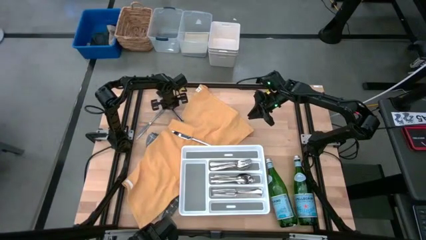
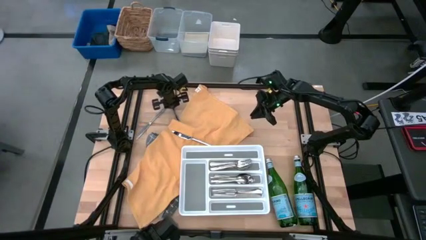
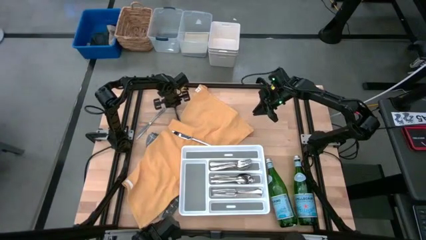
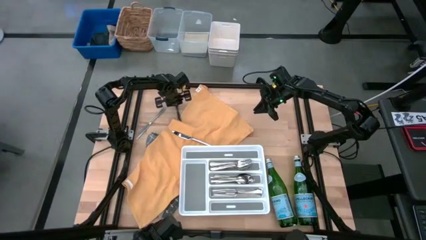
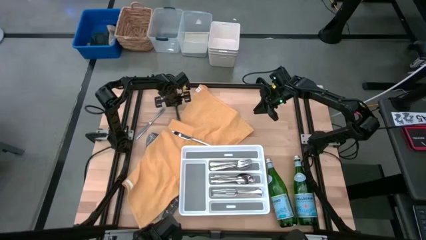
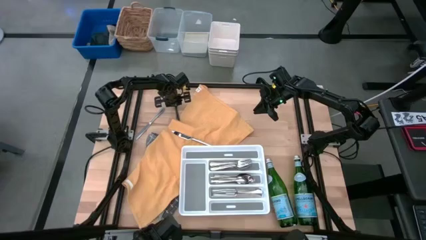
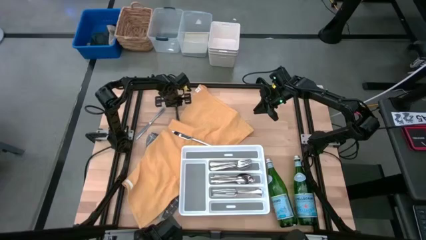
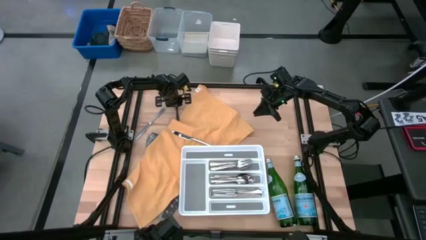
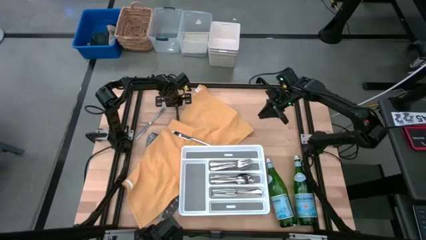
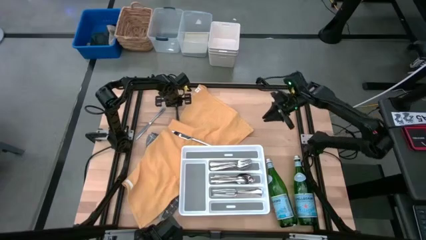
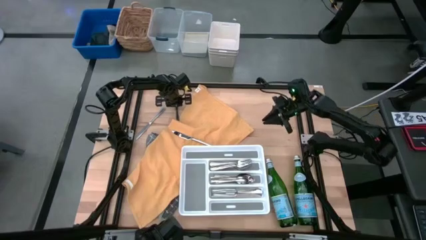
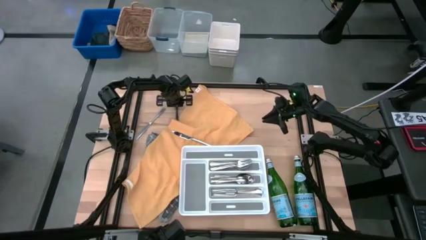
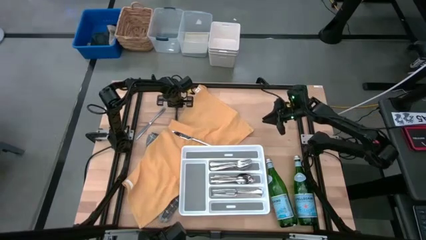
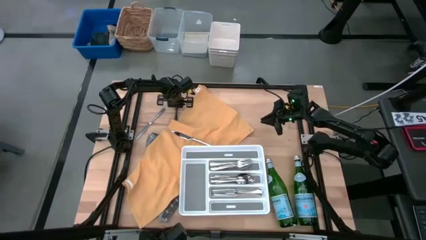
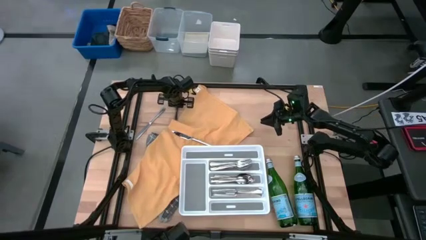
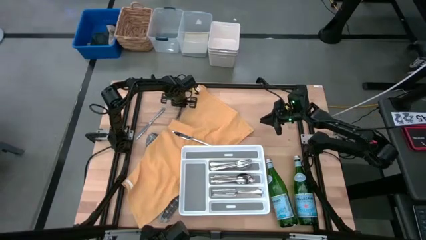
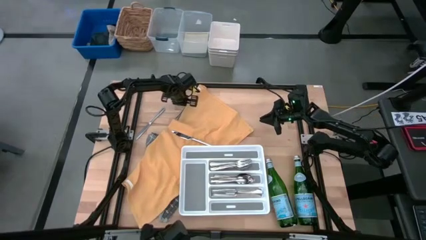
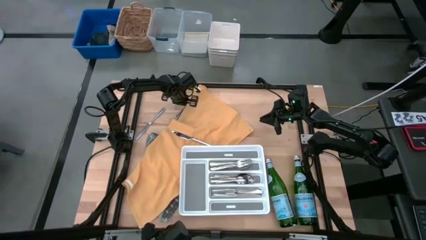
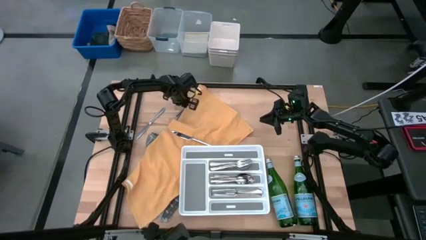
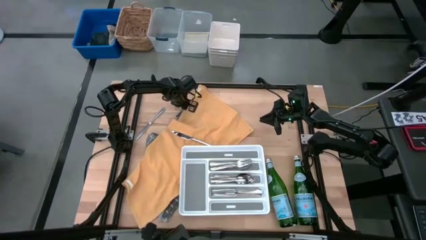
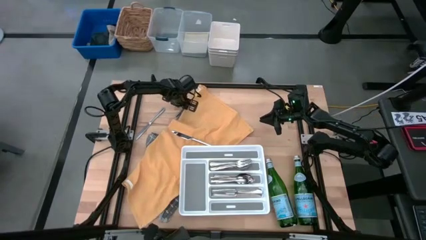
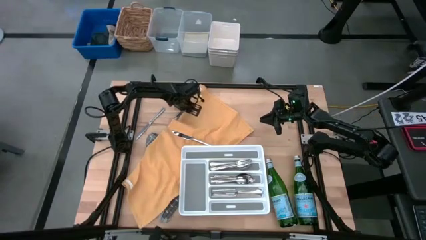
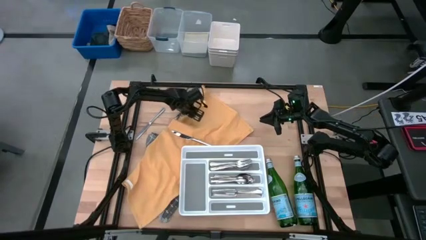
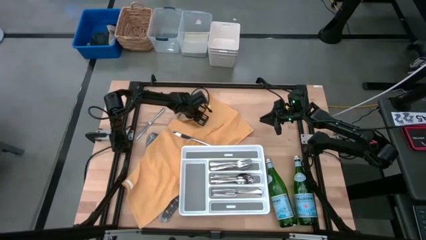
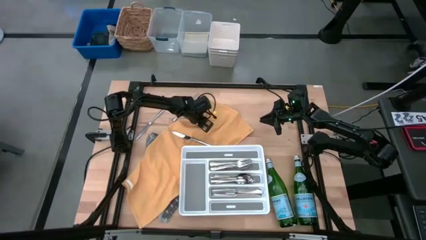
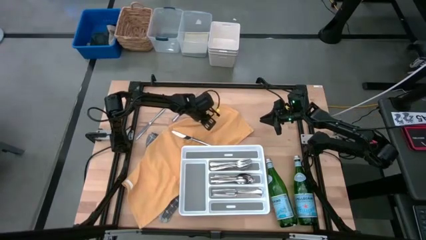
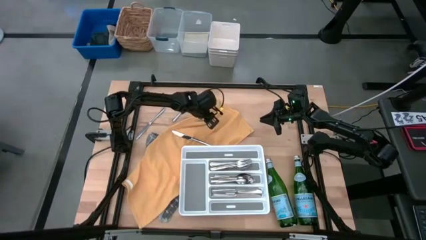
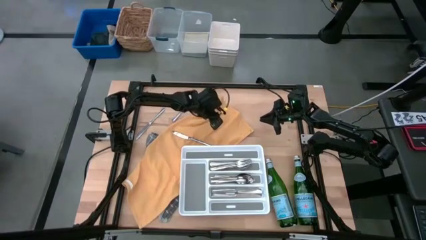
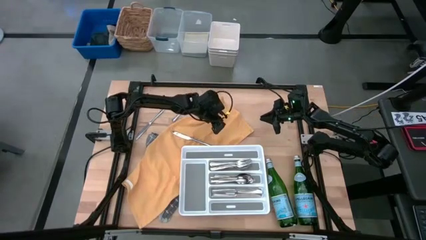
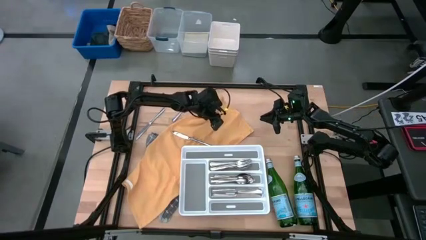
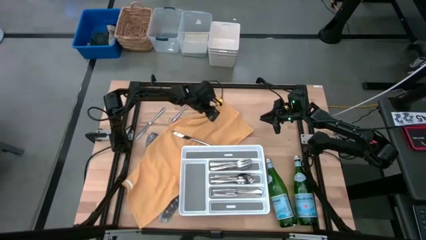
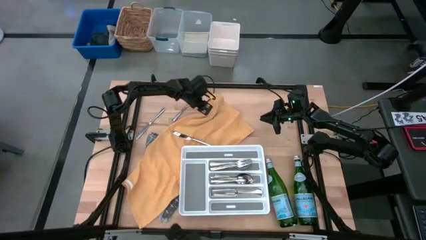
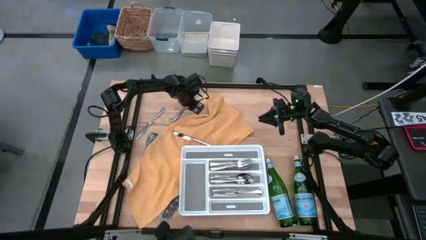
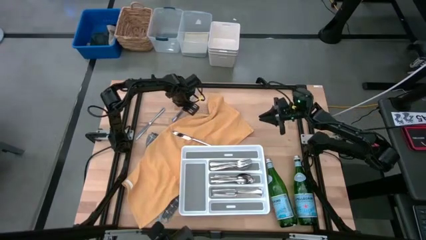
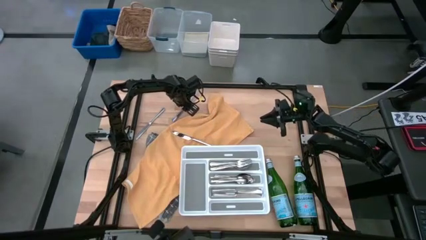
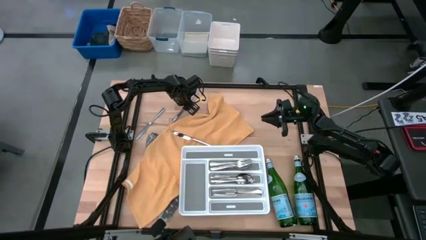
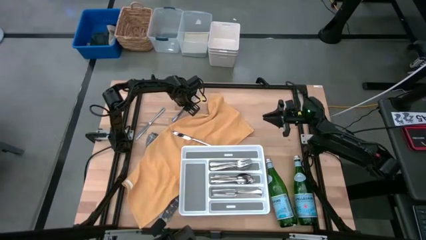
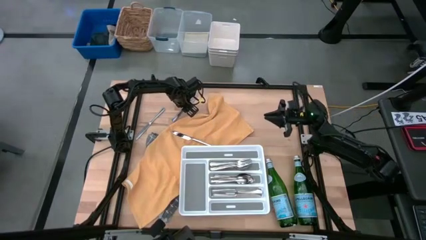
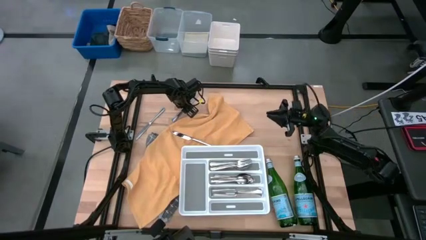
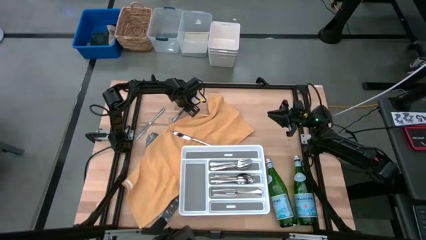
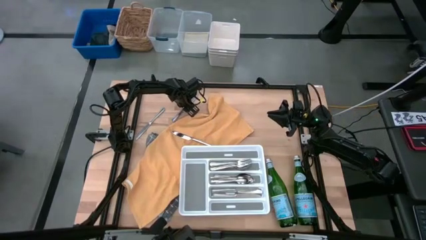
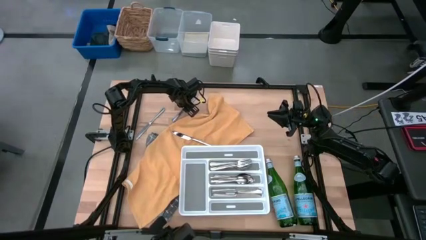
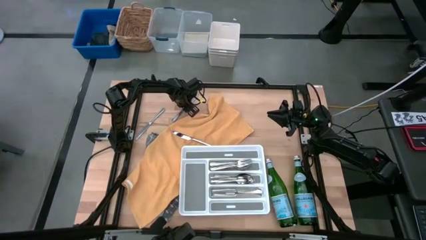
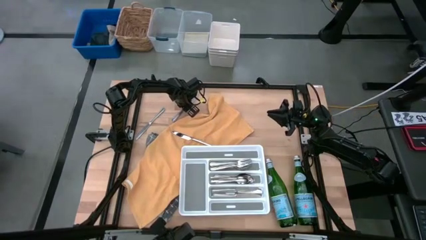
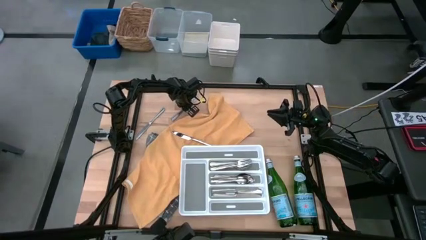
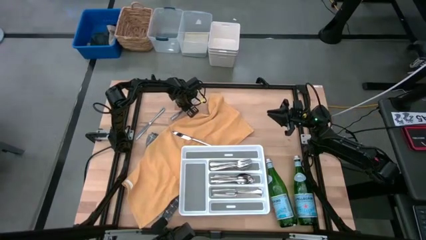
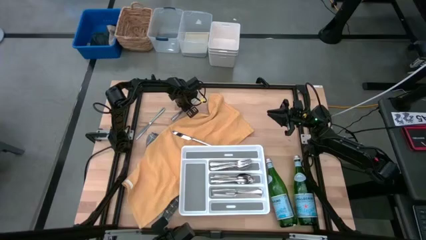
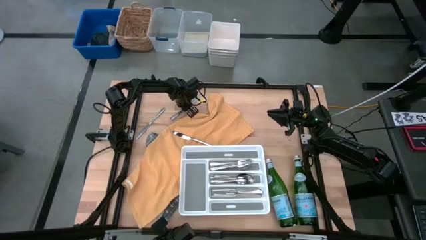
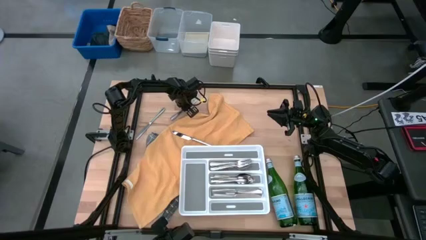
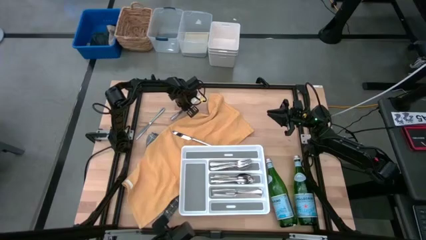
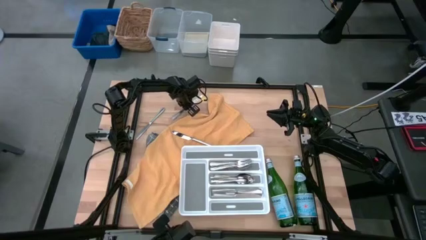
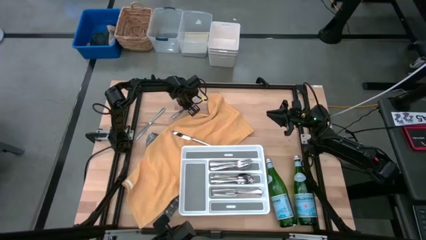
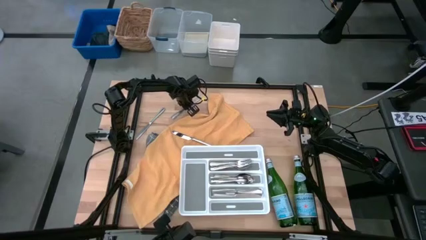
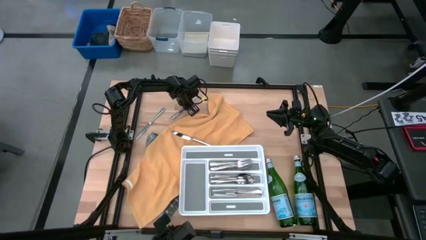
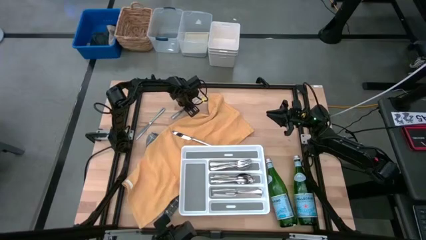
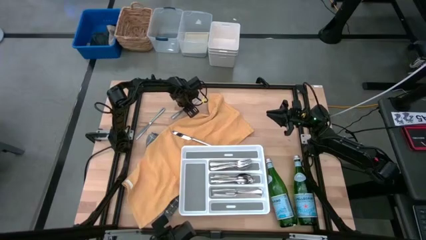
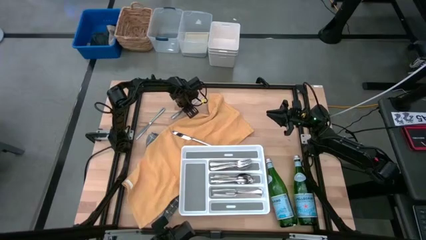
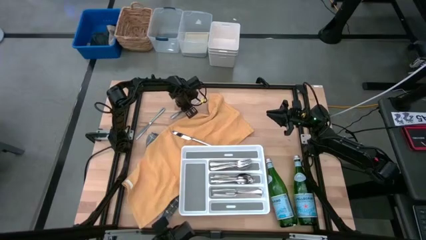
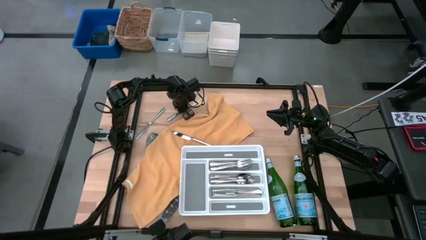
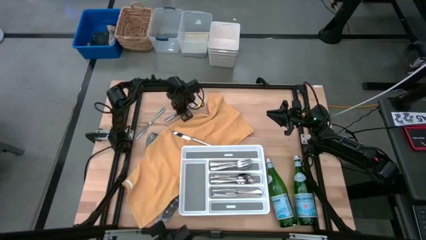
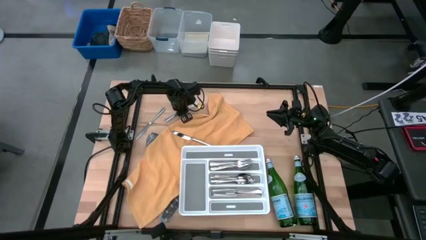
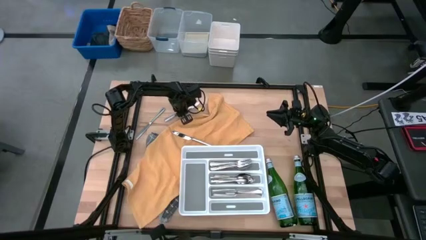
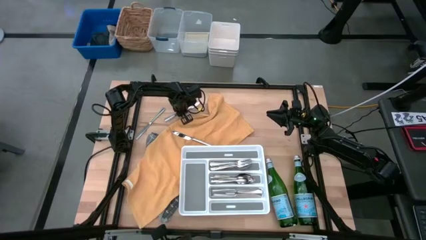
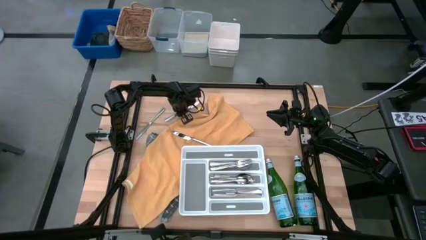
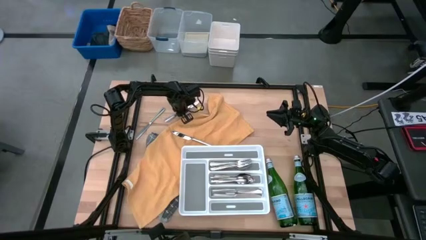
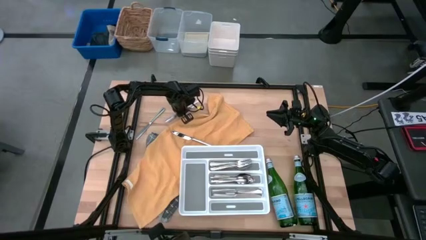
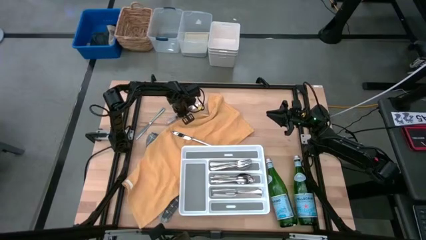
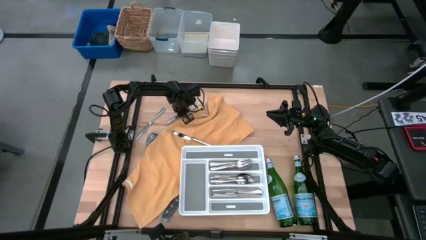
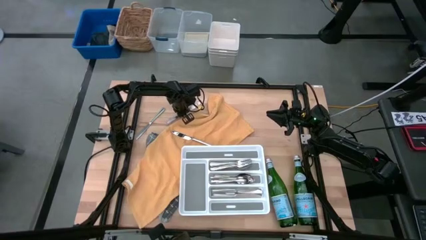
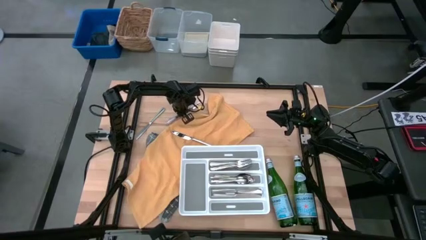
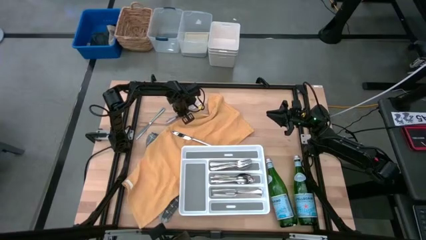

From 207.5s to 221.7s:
Task: Sort silverware
Put the silver table knife into the white silverware tray

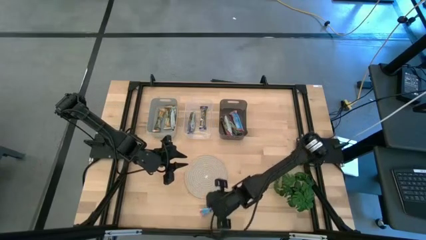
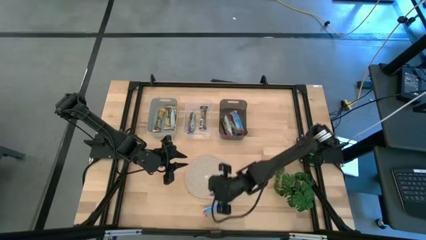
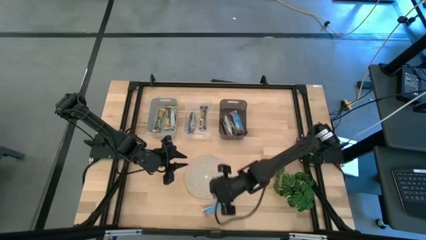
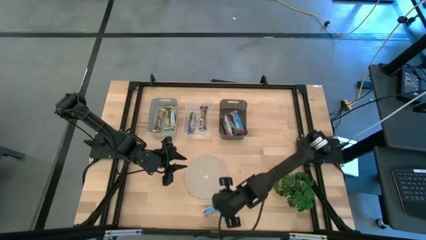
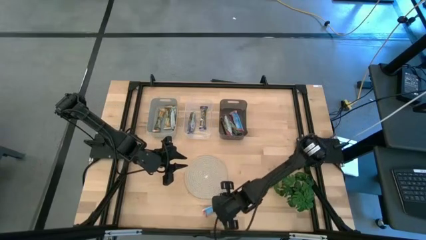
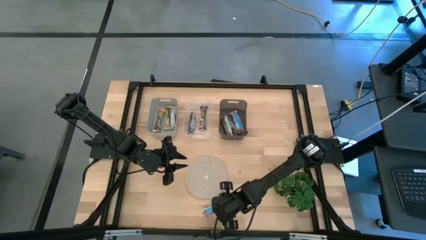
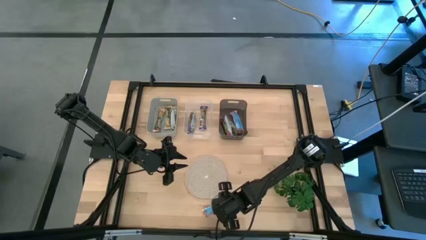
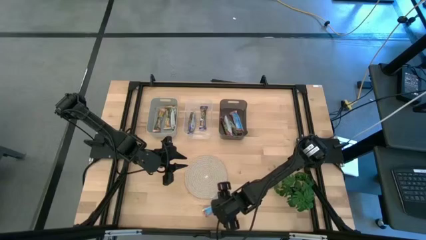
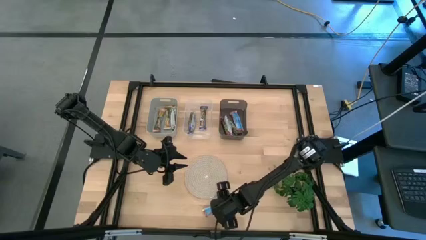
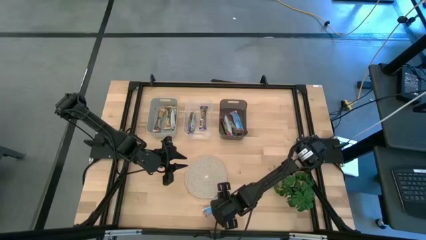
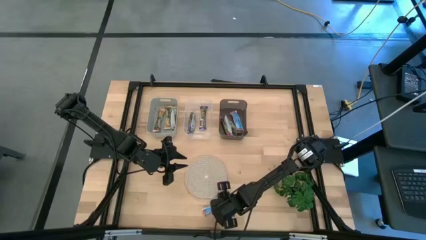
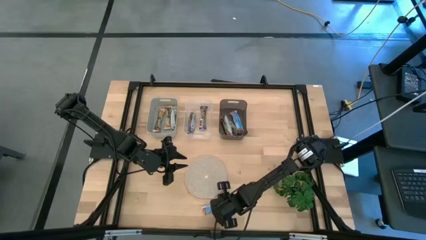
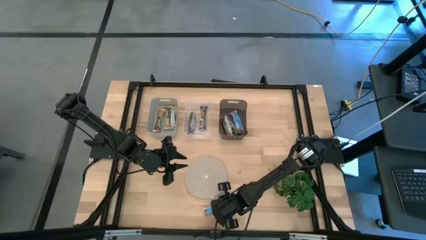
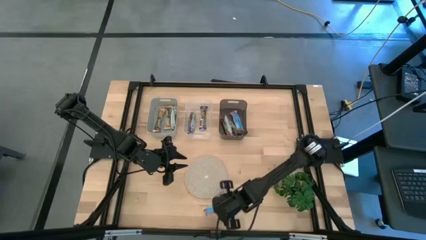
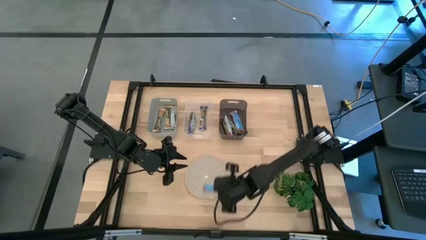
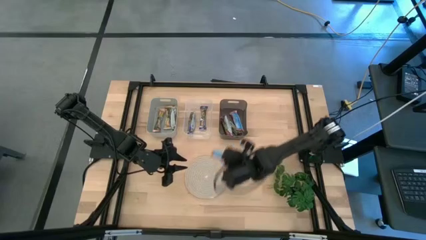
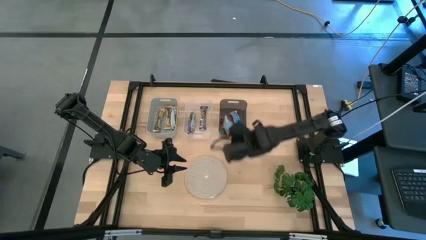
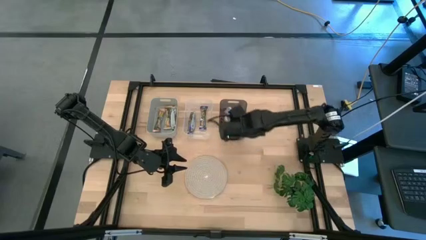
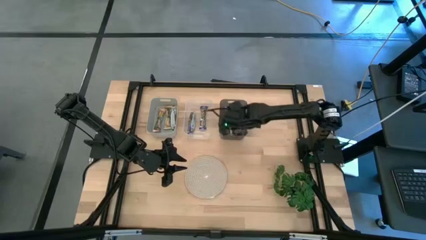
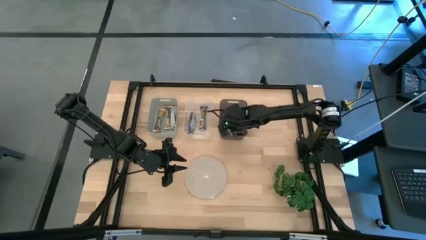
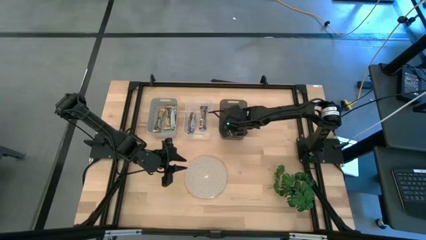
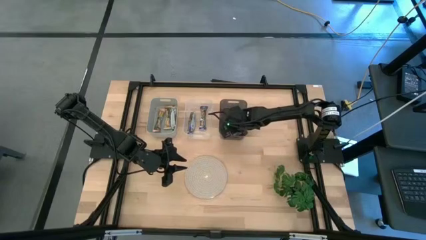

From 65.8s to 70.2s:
Task: Pick and place Granola Bars by type
Put the red granola bar into the black bin
